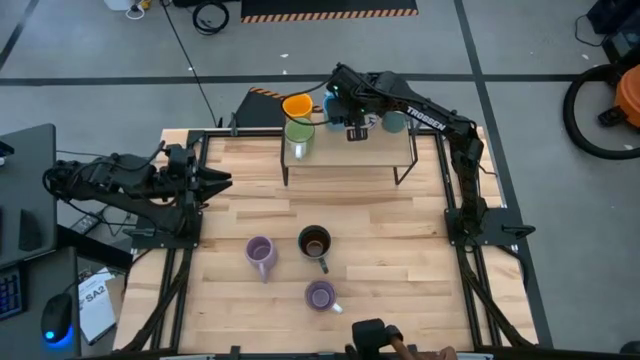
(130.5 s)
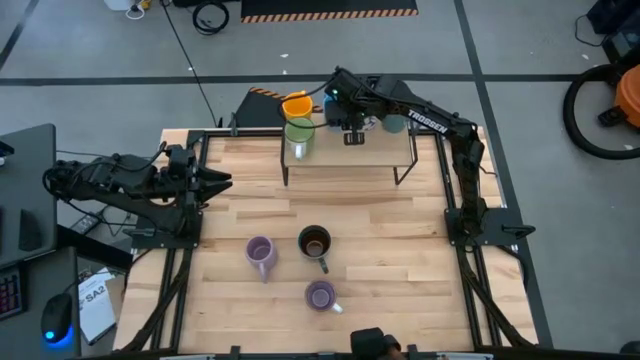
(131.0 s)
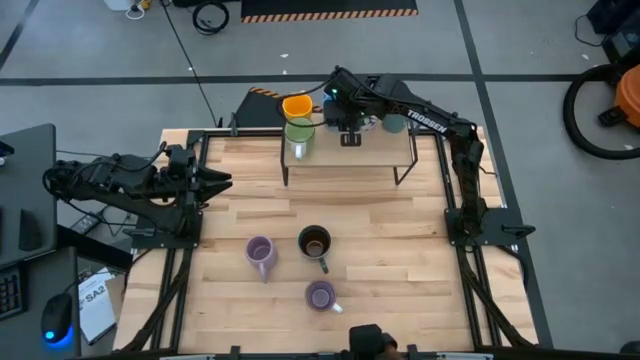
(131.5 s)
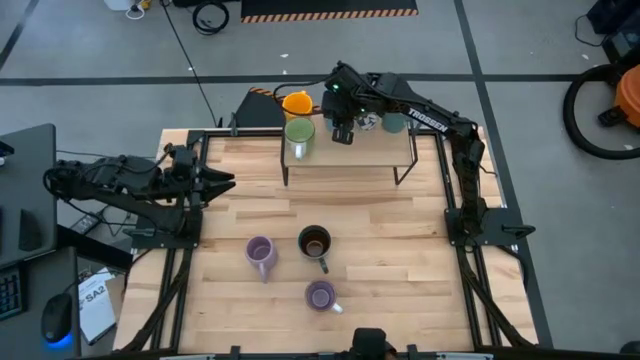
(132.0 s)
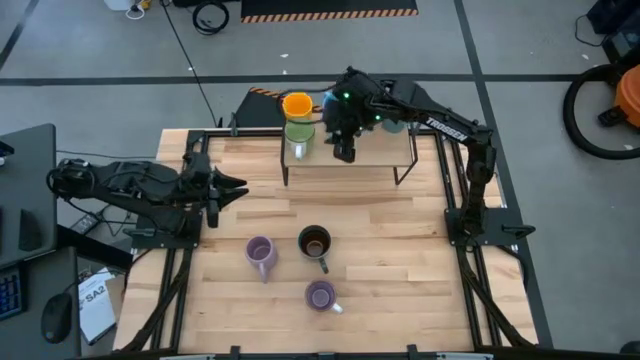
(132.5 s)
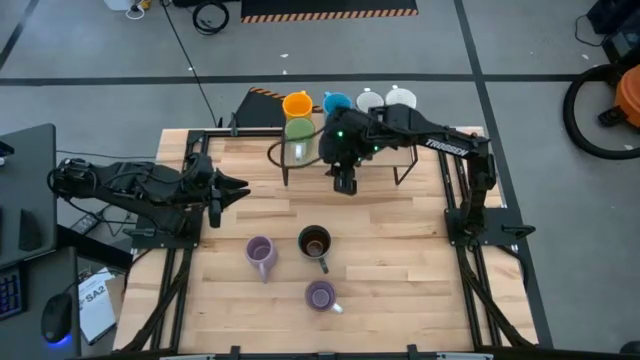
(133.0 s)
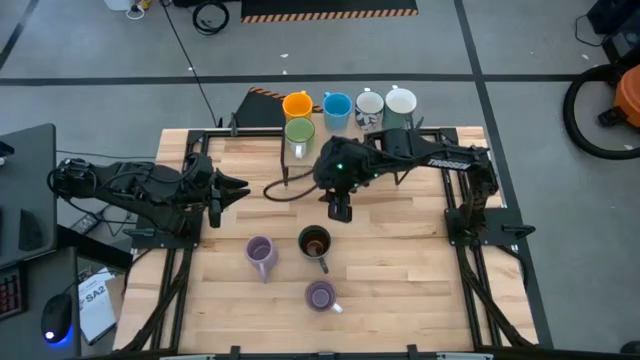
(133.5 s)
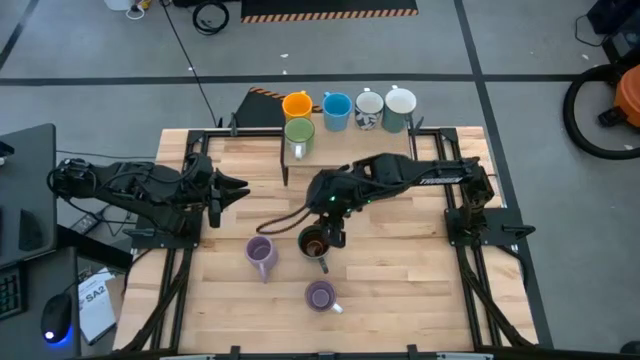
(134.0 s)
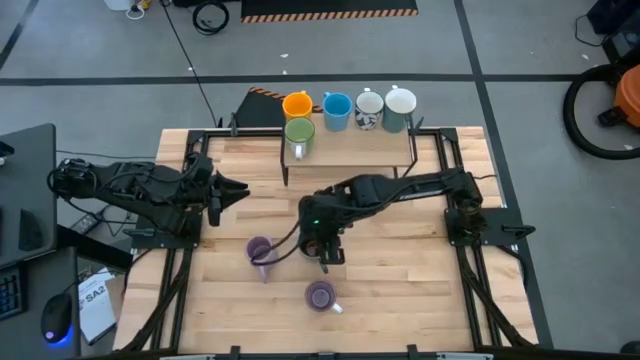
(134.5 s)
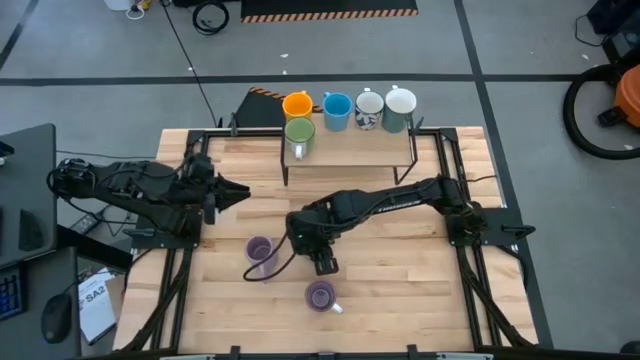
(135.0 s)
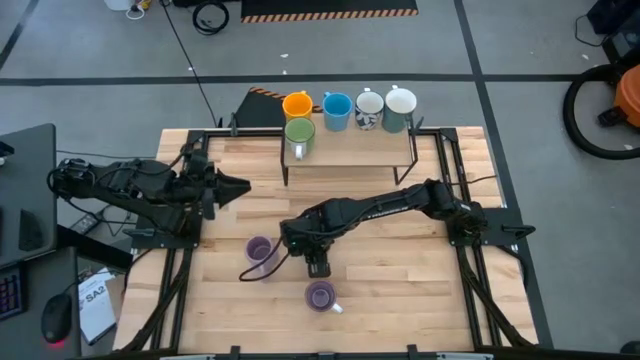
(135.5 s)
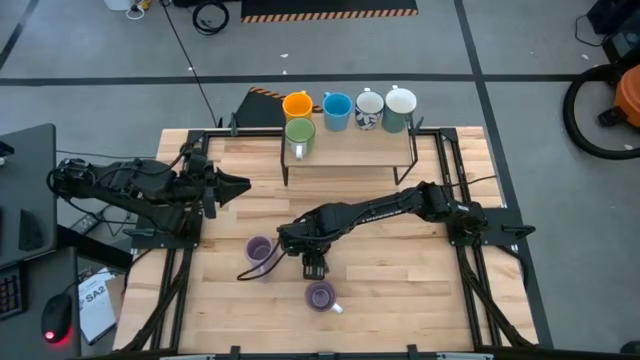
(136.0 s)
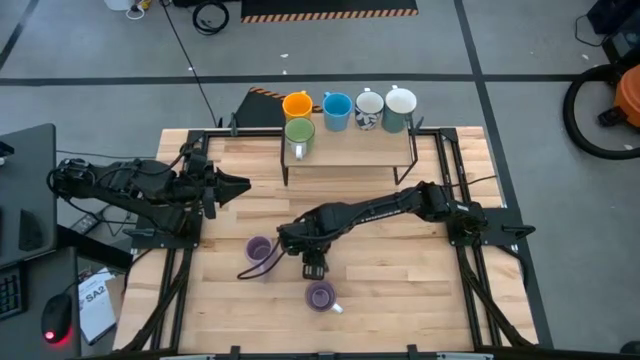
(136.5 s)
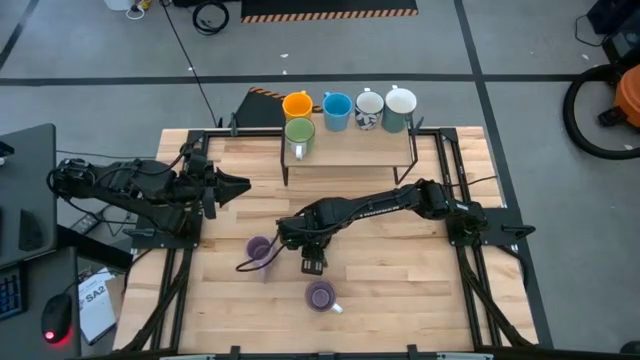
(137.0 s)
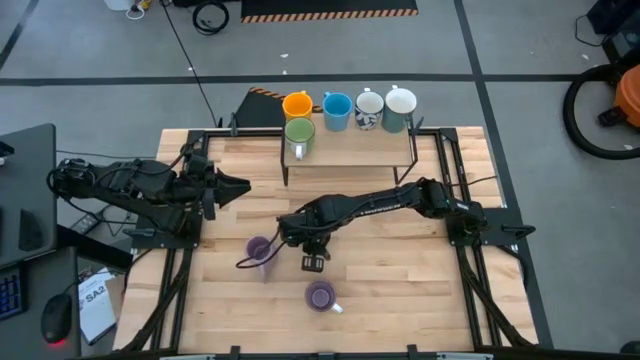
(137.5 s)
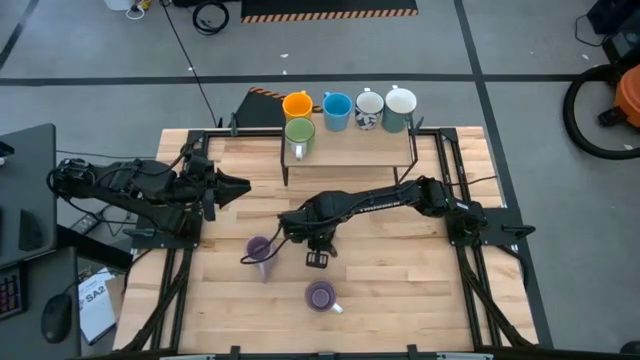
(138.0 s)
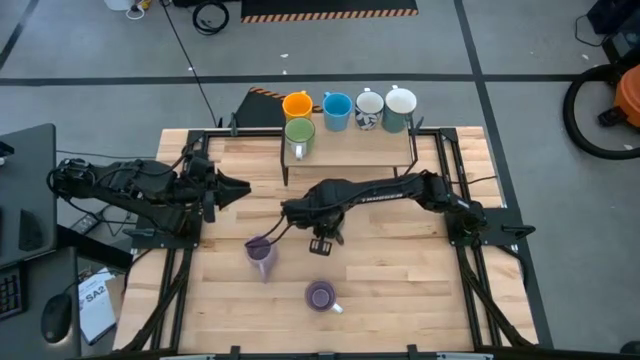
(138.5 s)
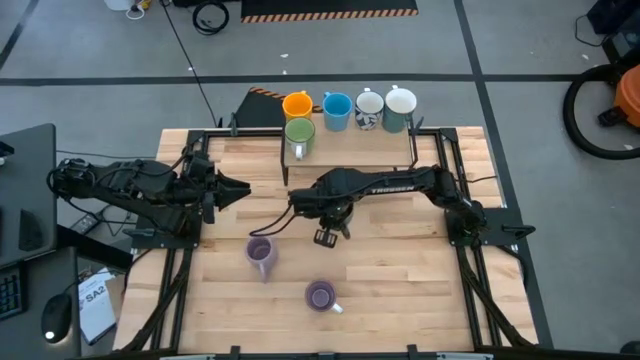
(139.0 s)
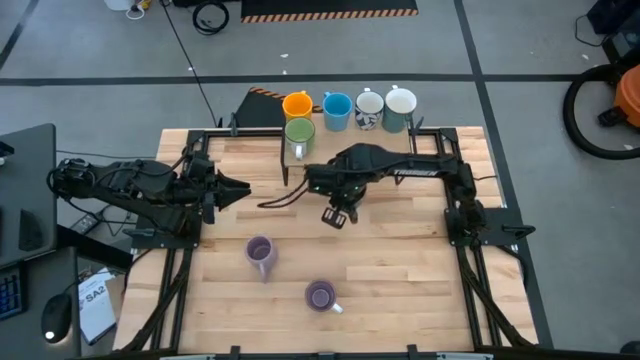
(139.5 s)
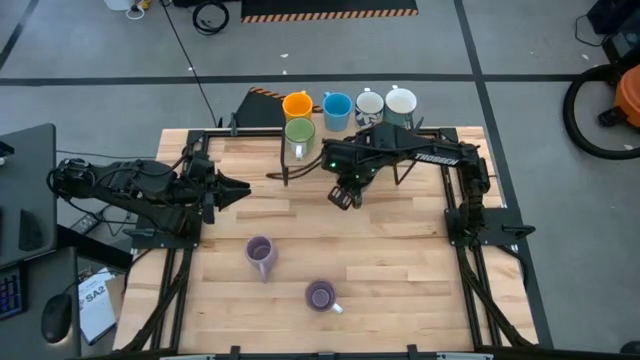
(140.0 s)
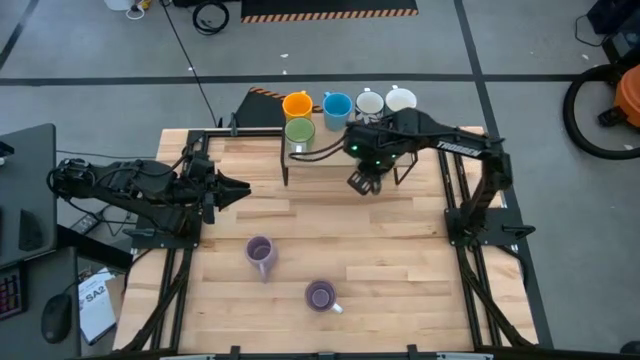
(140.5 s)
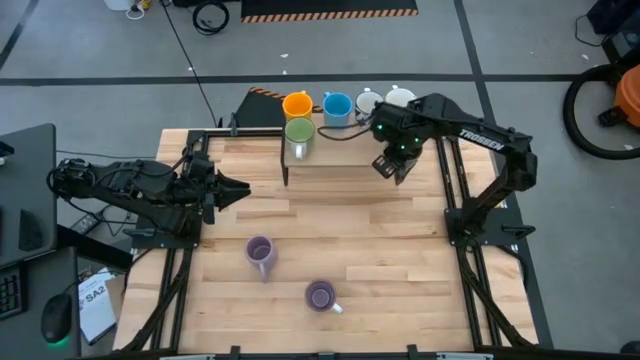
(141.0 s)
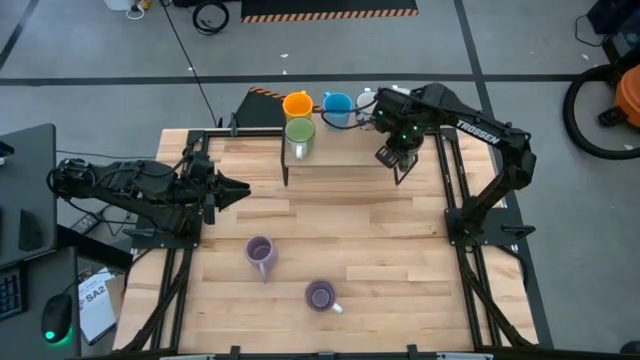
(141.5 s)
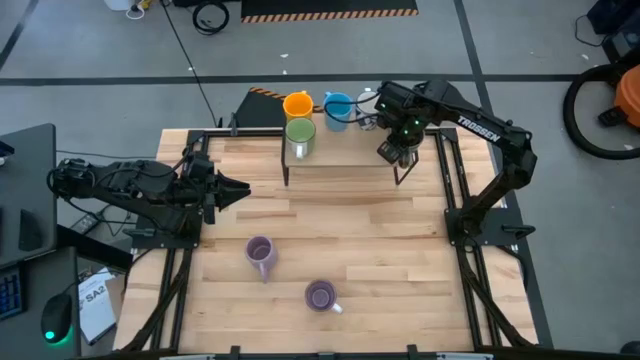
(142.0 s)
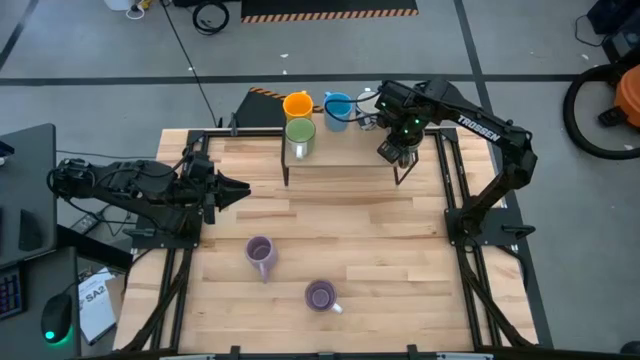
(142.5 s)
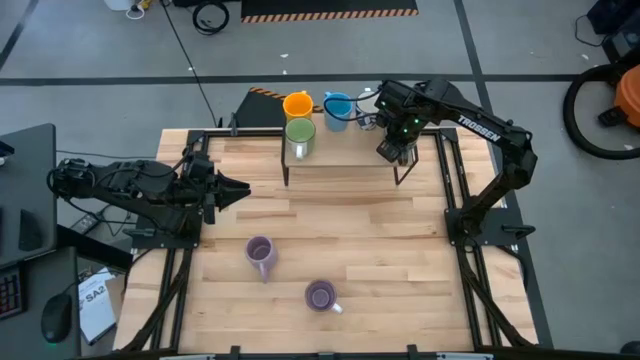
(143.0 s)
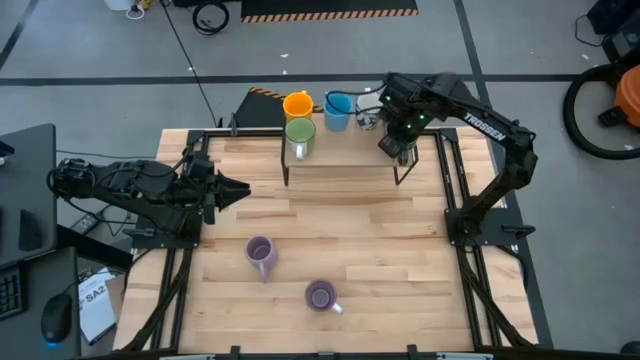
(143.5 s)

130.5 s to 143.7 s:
Task: Place coffee mugs
Put the dark blue mug on the shelf

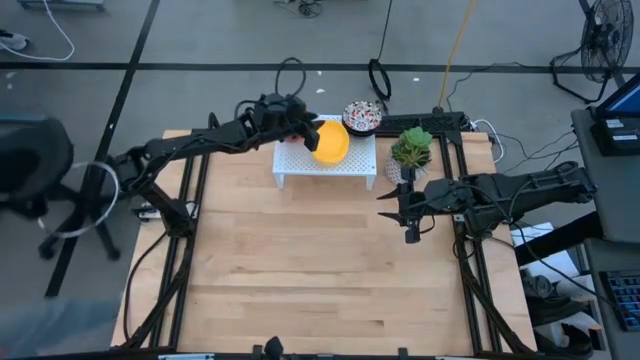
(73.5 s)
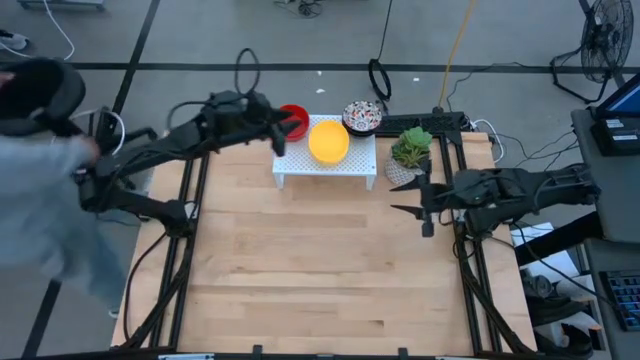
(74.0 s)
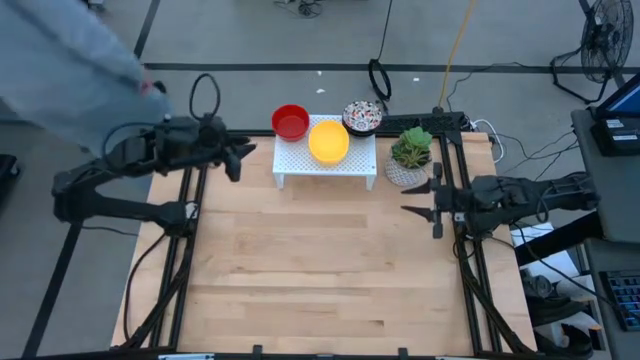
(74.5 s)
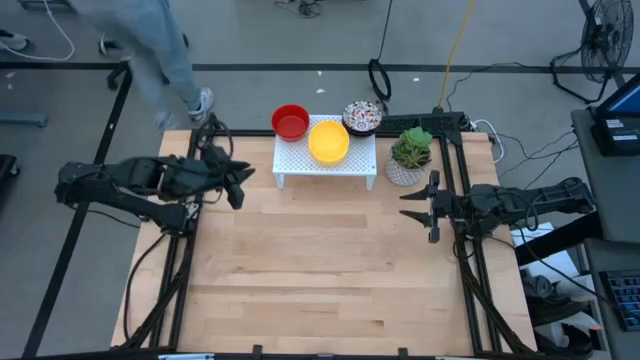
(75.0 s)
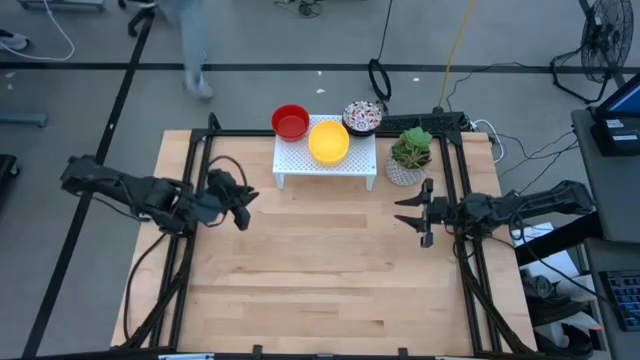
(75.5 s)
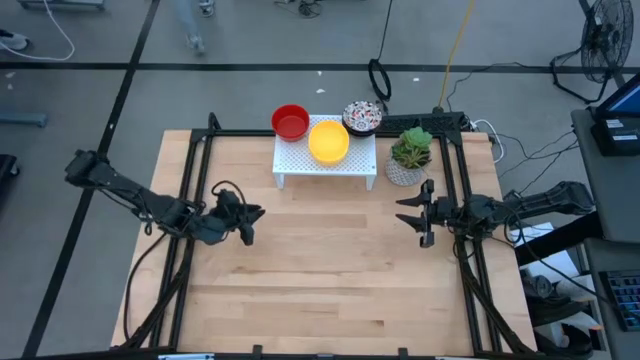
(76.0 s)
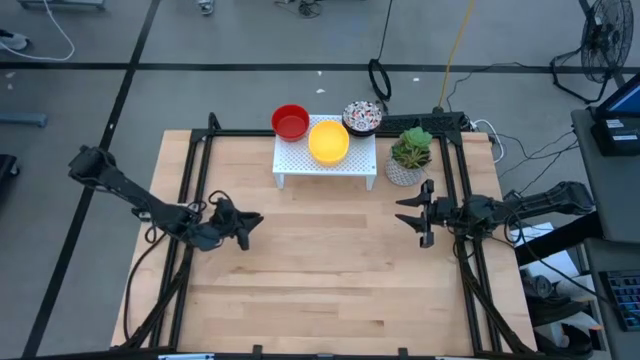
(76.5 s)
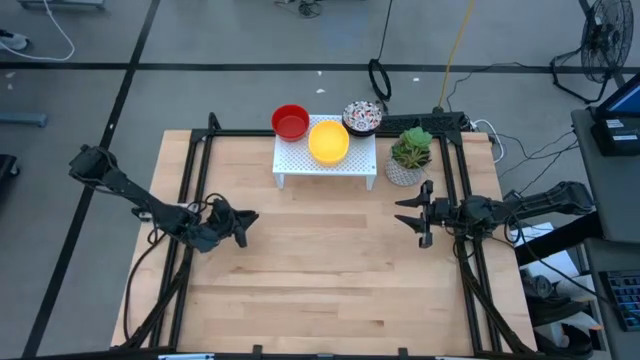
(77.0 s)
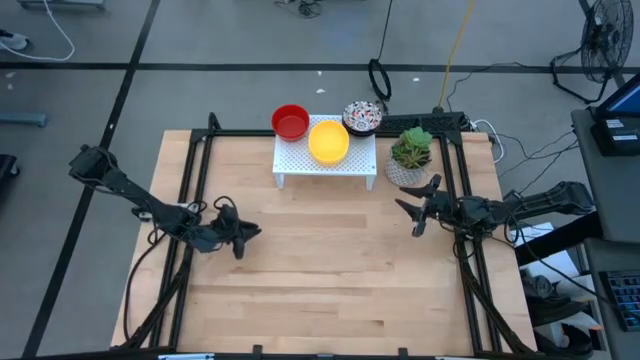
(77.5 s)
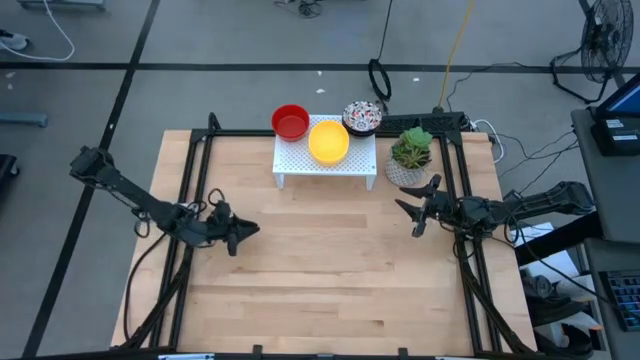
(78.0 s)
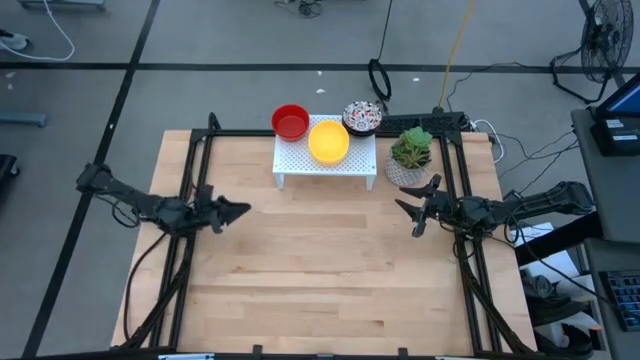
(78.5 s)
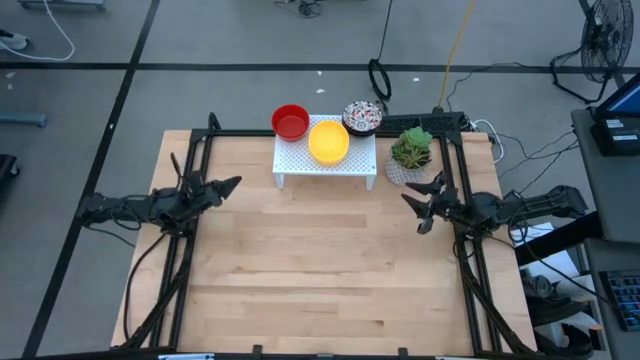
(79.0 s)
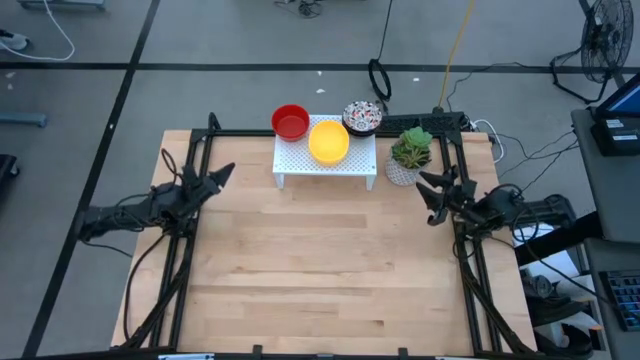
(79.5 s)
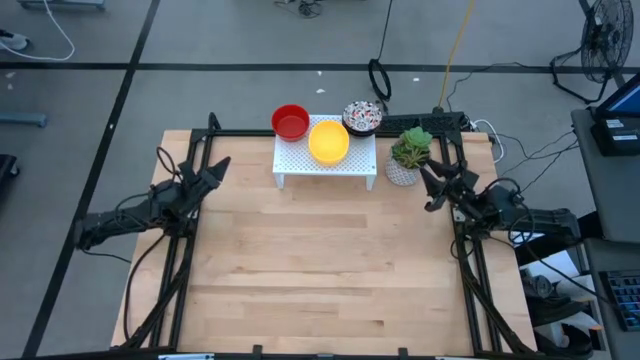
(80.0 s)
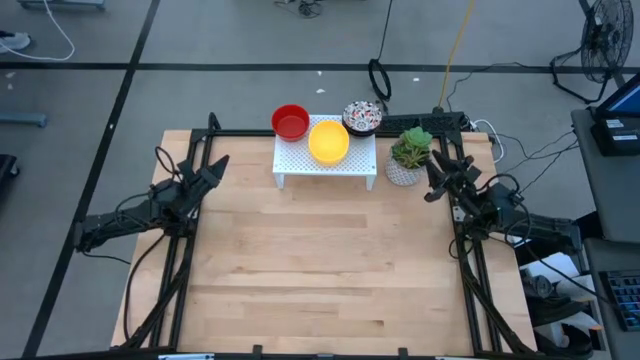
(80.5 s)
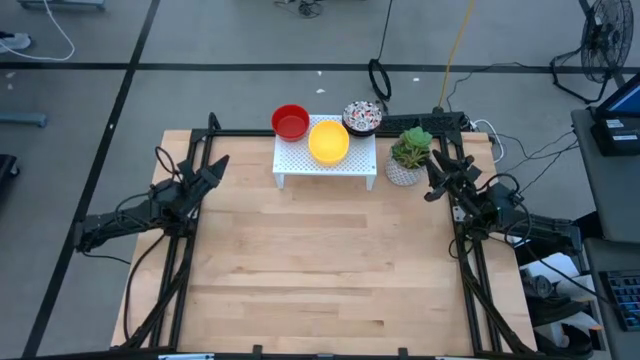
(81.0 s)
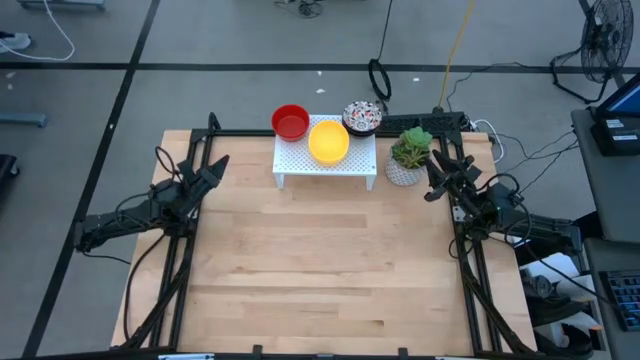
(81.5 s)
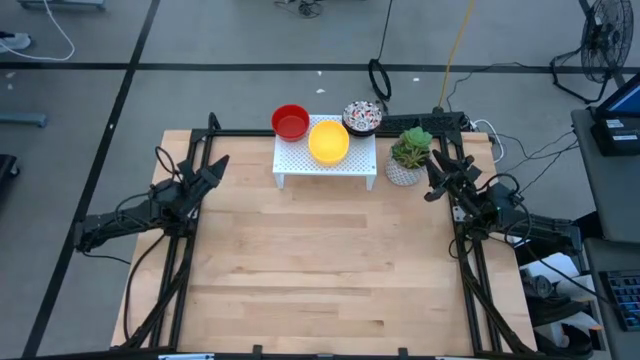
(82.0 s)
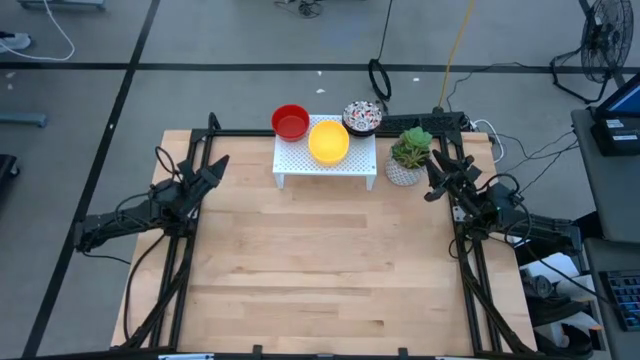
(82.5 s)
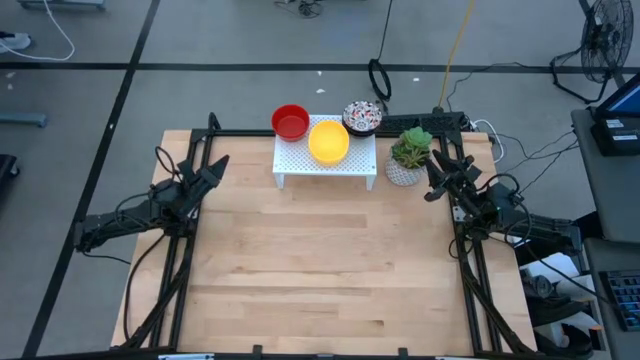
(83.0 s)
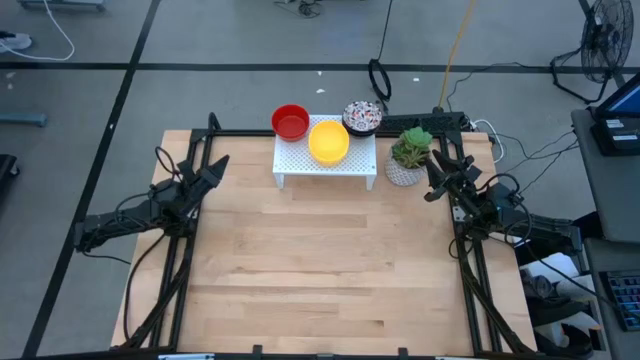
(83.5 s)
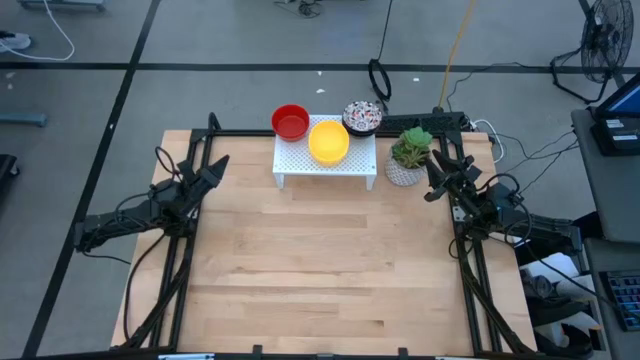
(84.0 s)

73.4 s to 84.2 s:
Task: Pick & Place Mini bowls
Return to Home Position
